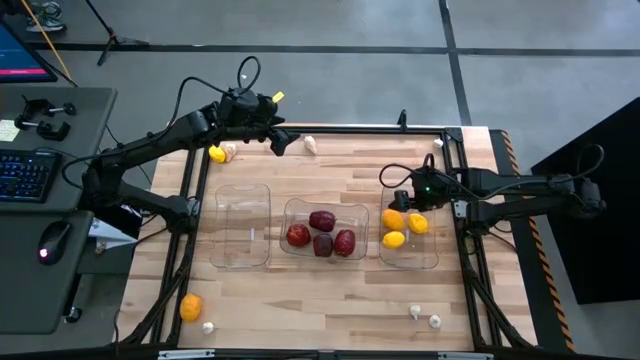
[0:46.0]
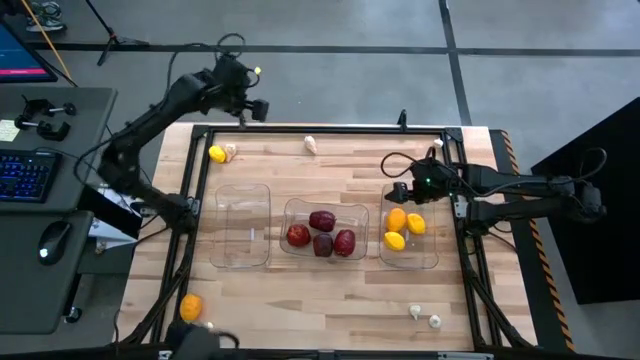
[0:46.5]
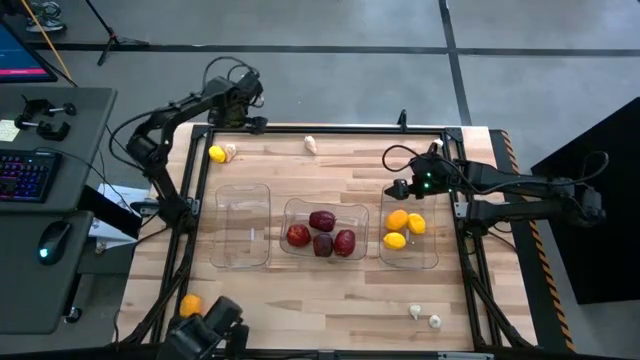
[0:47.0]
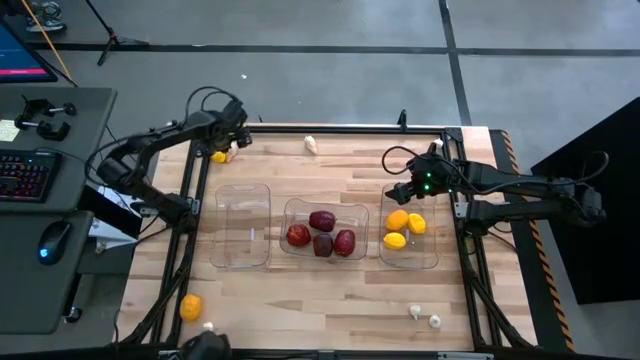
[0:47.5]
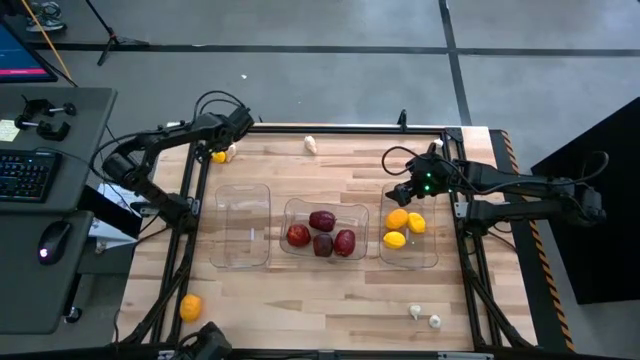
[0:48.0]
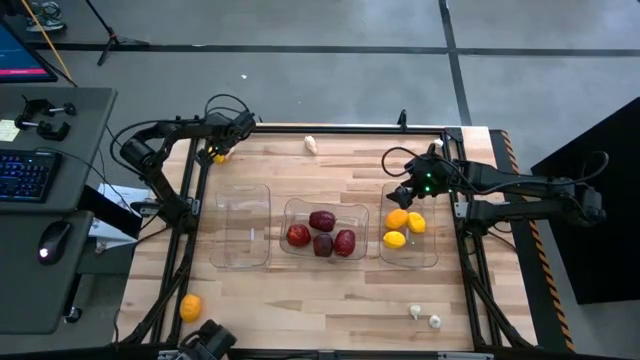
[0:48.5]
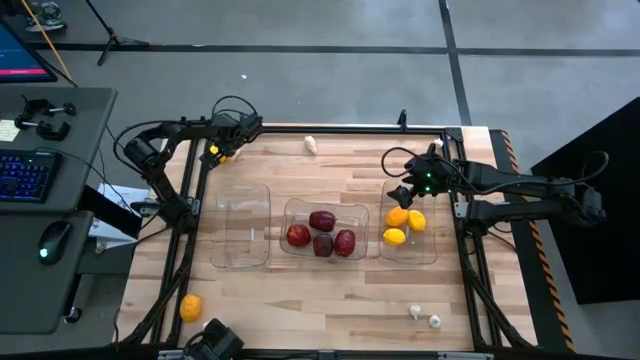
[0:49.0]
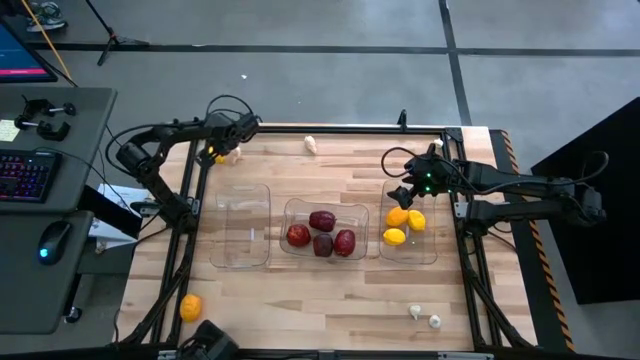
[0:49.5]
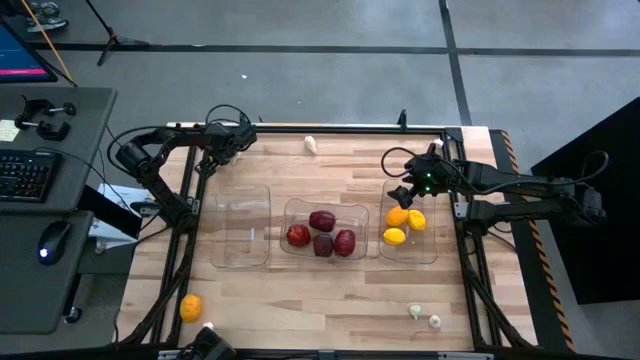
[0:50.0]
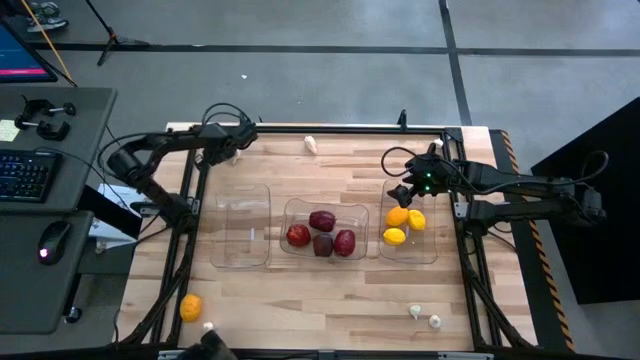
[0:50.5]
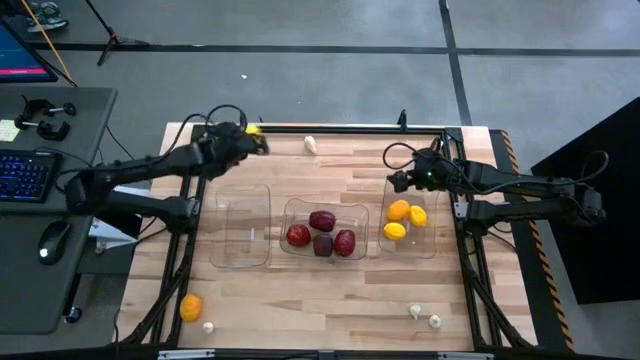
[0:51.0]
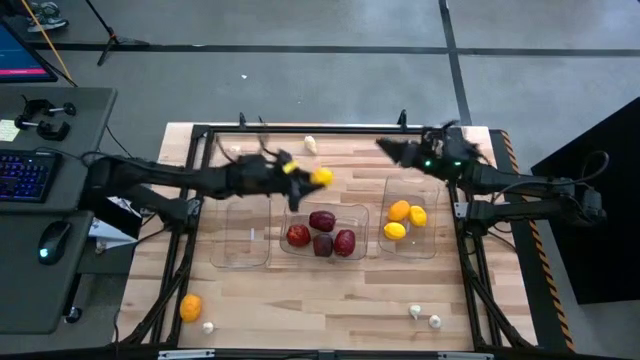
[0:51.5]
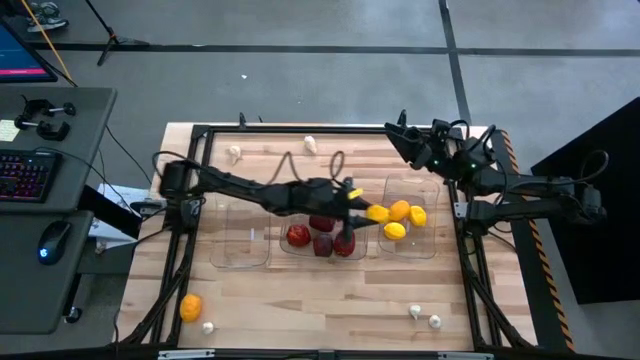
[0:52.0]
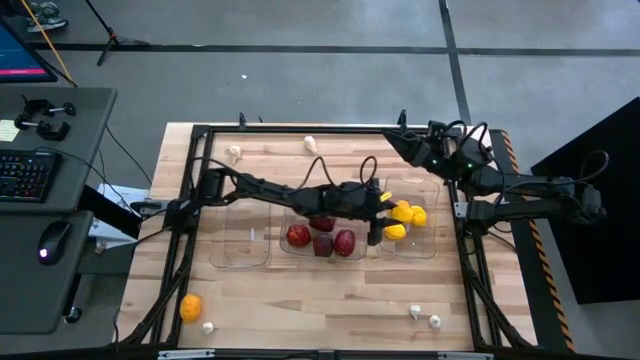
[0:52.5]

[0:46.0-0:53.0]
Task: Sort produce into baskets
Put the top yellow lemon into the right transparent bin

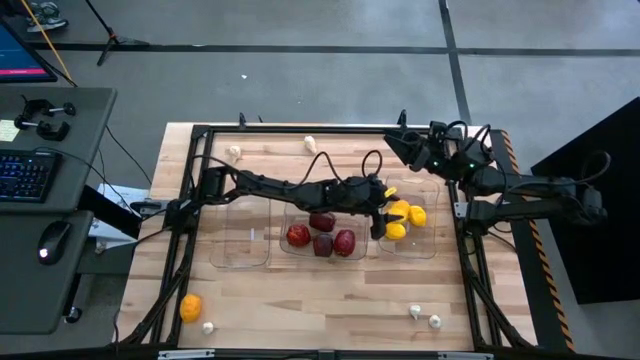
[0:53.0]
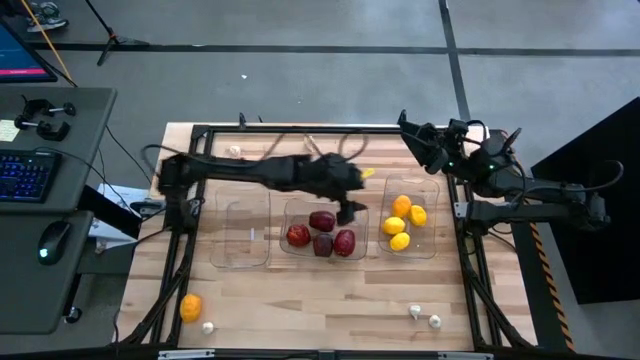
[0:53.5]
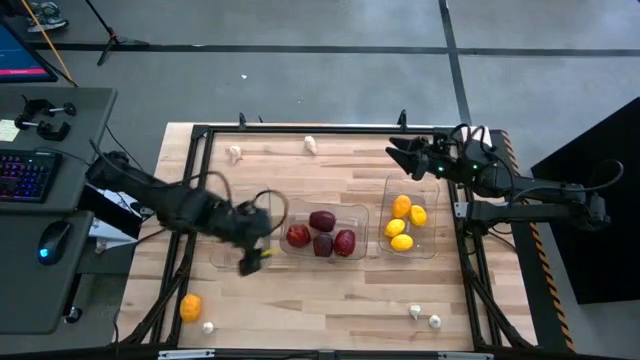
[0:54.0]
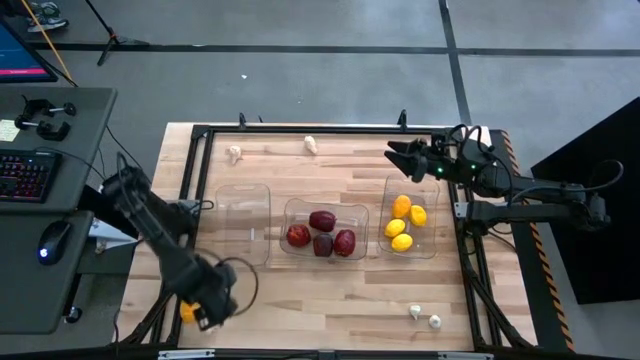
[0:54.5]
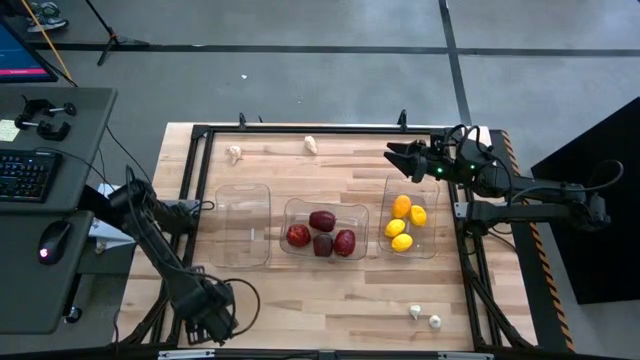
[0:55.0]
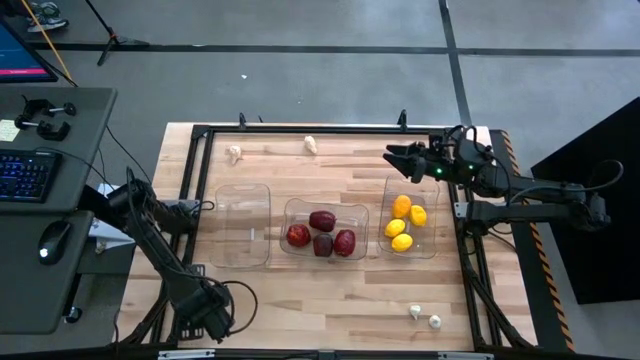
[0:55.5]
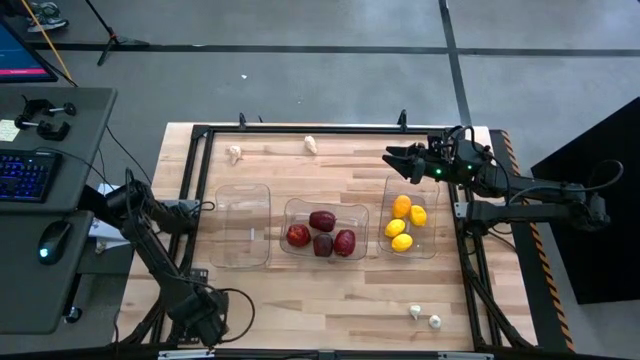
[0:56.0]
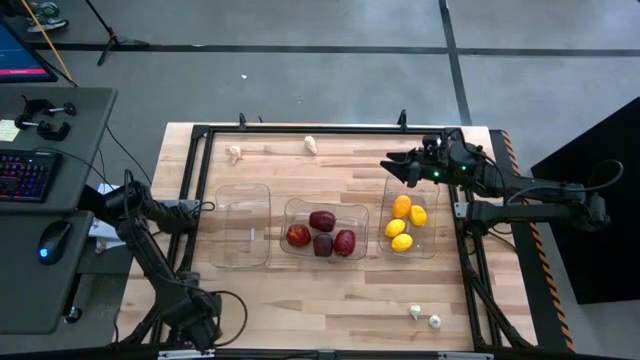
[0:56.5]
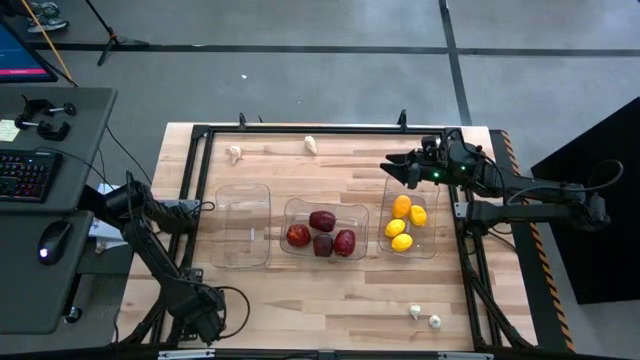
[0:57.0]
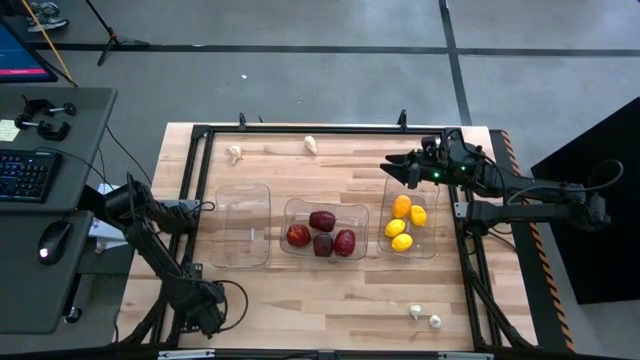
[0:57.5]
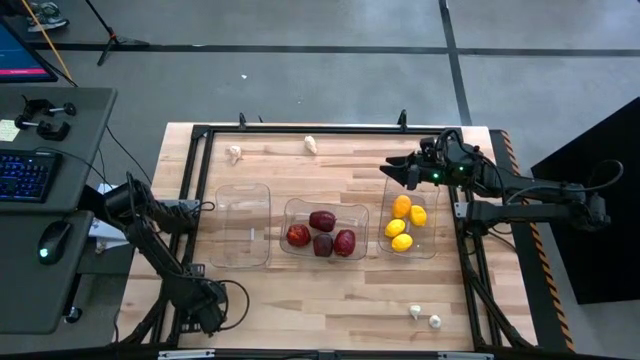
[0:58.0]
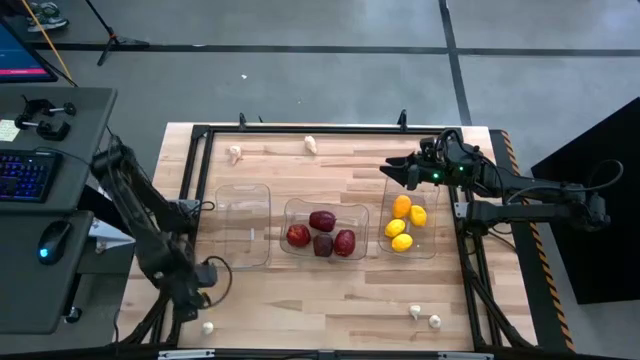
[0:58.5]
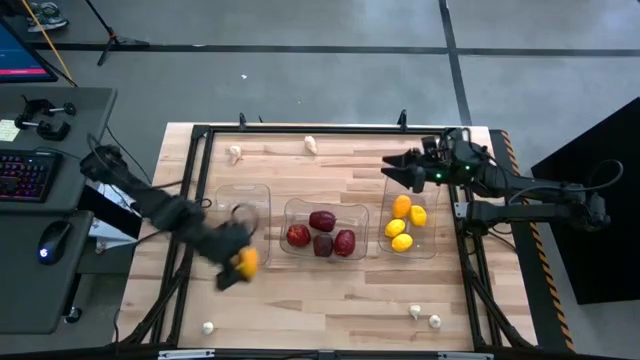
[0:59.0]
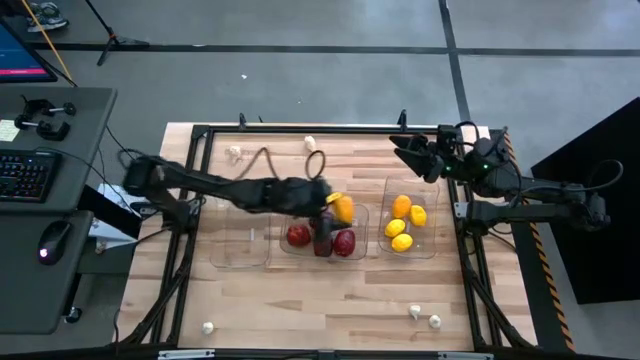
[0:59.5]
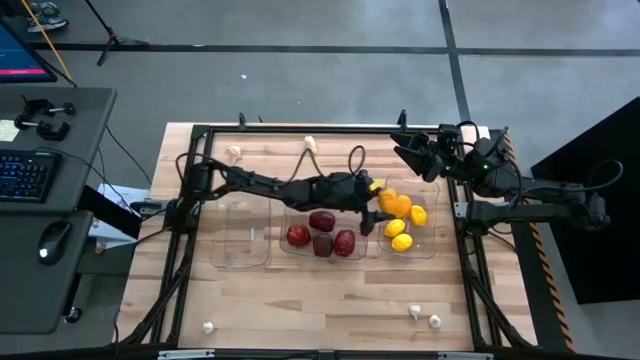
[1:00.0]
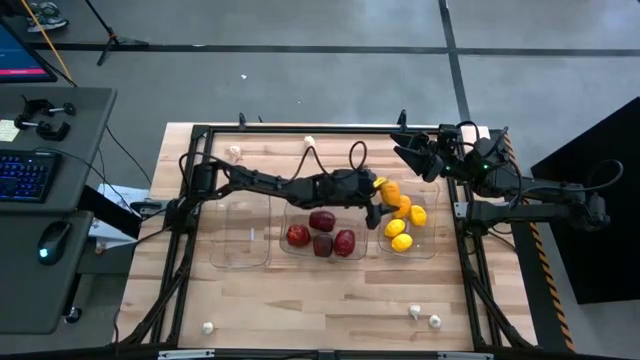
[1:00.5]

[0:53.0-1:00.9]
Put the yellow lemon into the right transparent bin

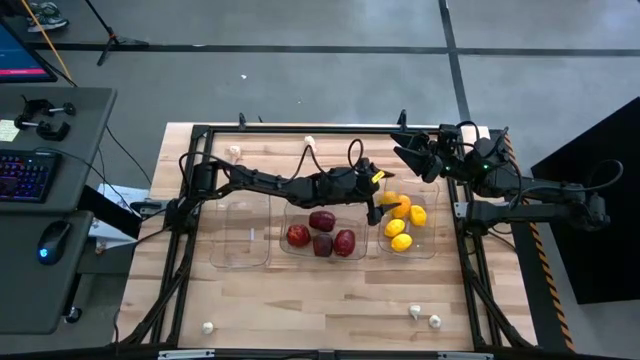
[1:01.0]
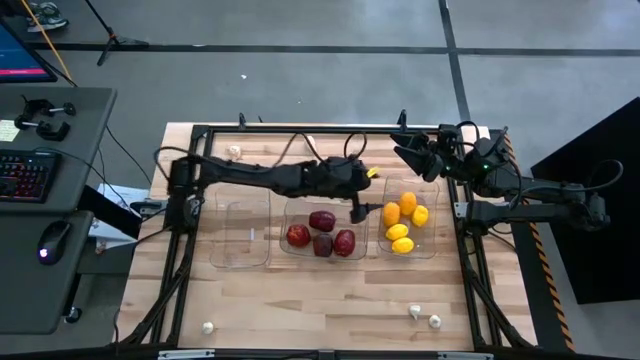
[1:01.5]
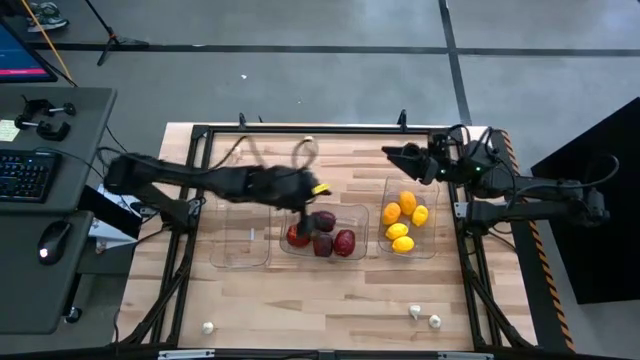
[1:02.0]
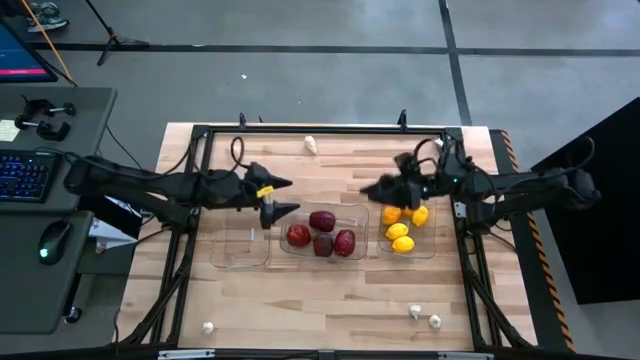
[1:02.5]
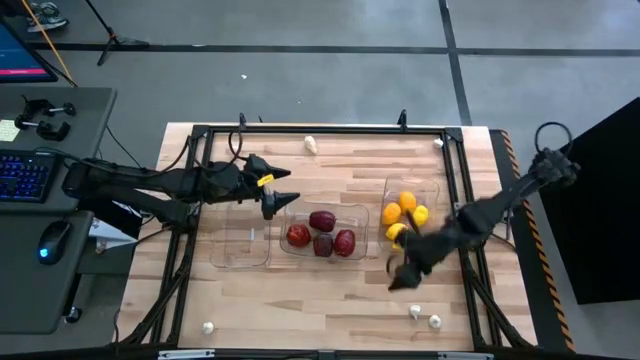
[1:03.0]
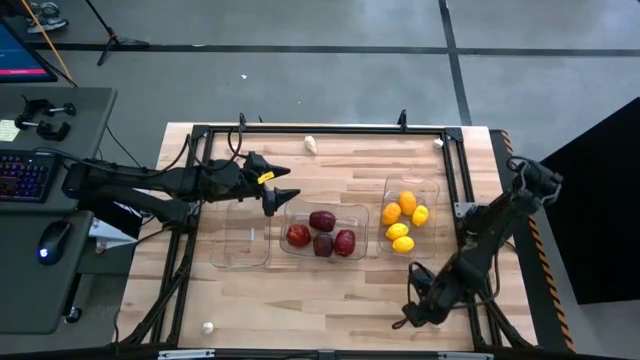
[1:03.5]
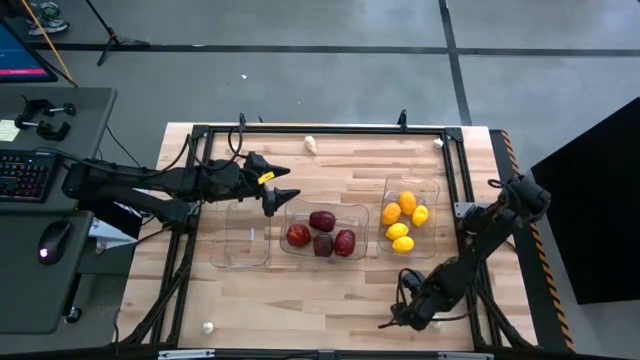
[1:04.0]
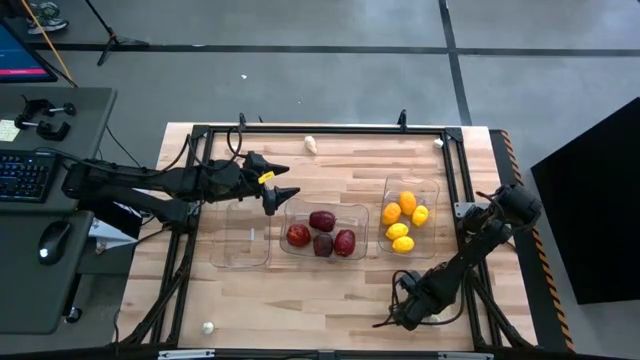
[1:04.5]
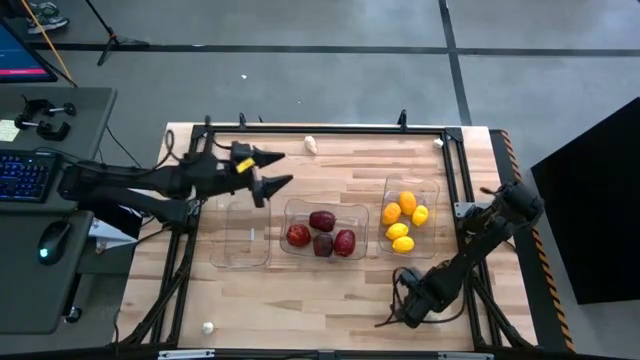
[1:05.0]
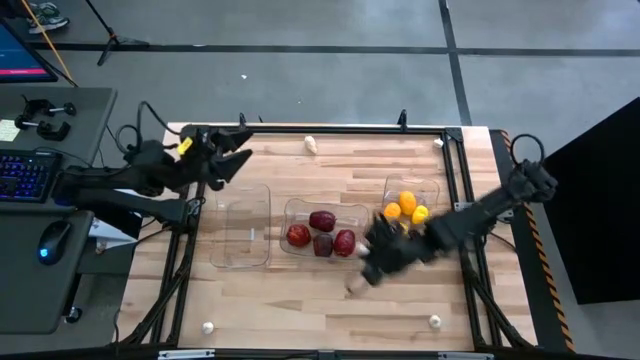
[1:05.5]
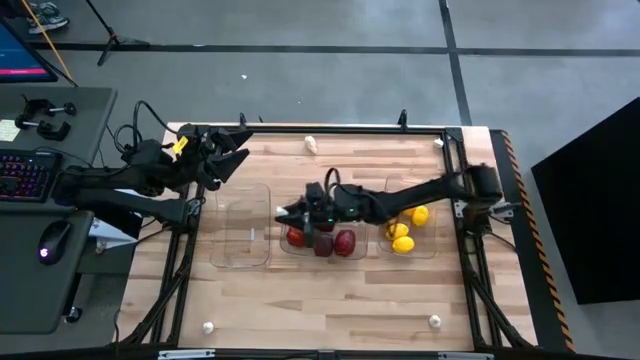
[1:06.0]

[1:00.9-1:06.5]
Put the bottom right white garlic into the left transparent bin
